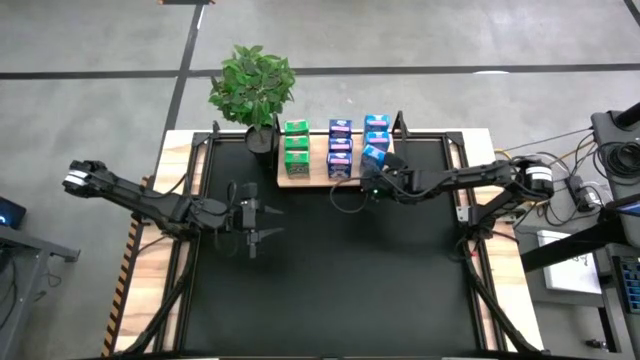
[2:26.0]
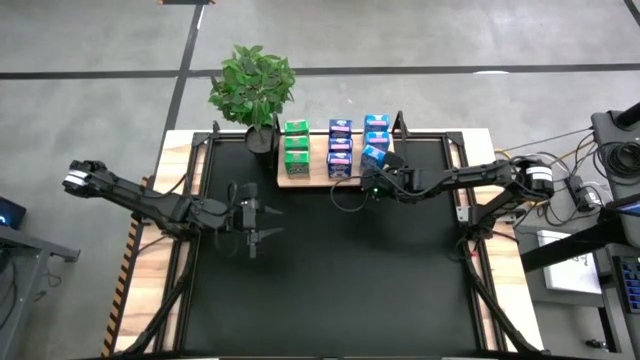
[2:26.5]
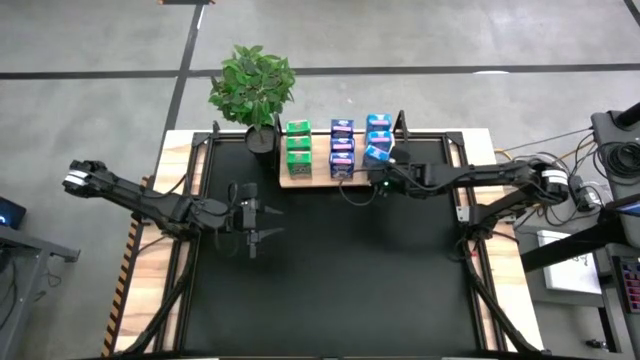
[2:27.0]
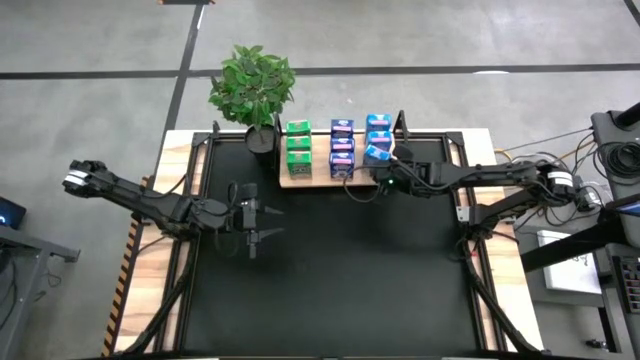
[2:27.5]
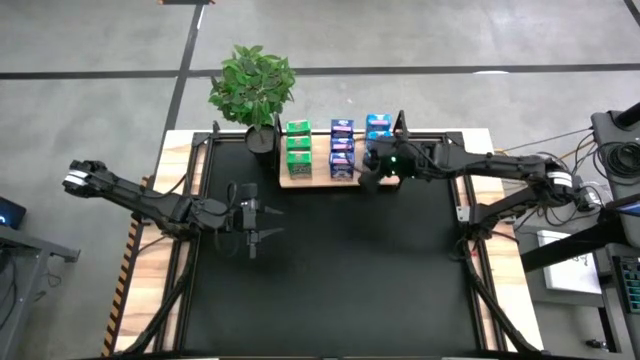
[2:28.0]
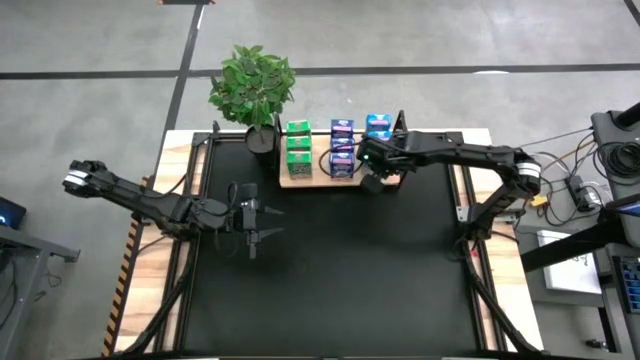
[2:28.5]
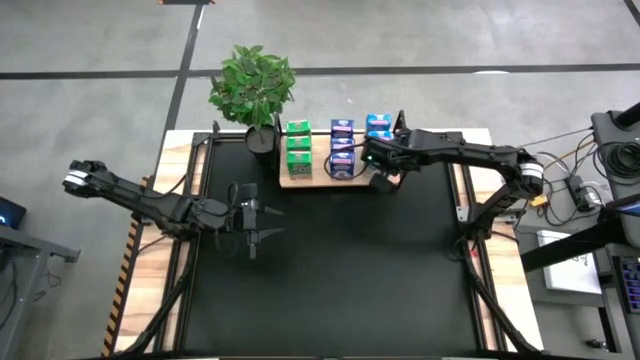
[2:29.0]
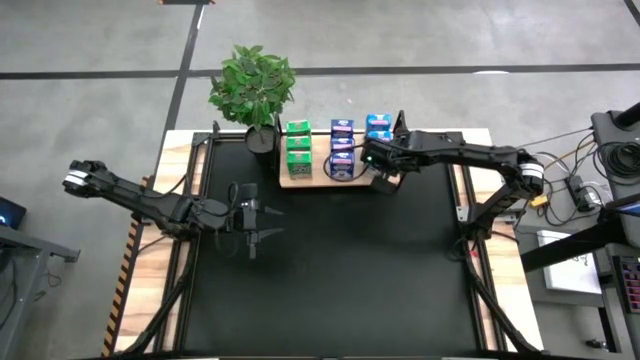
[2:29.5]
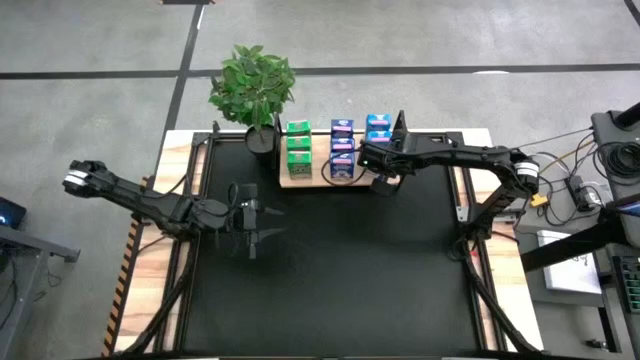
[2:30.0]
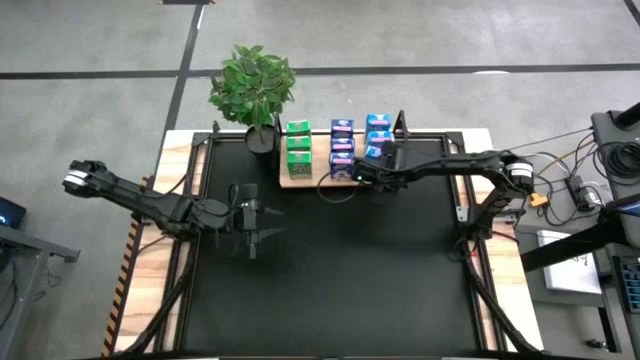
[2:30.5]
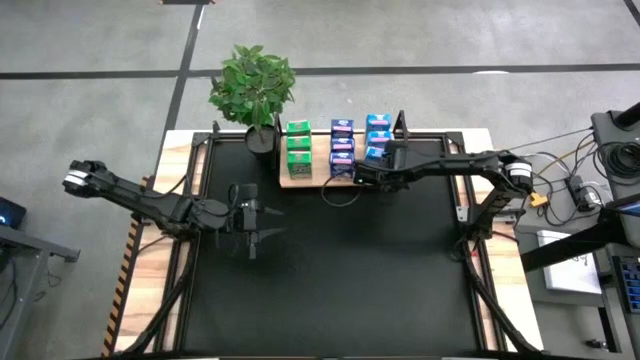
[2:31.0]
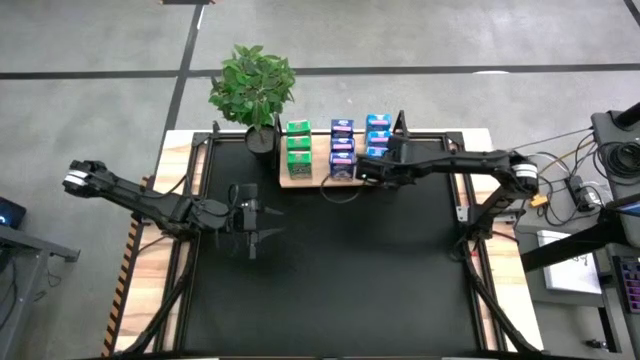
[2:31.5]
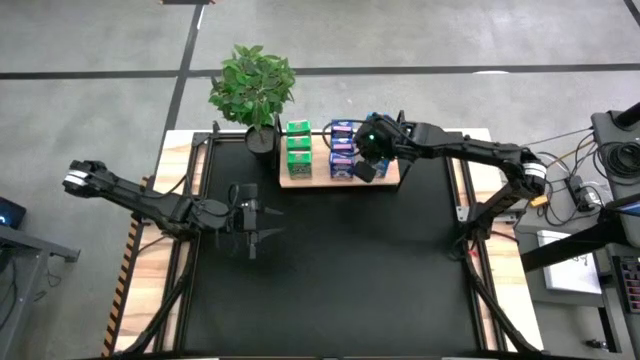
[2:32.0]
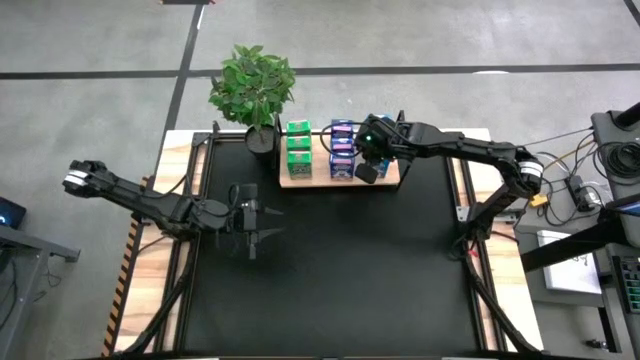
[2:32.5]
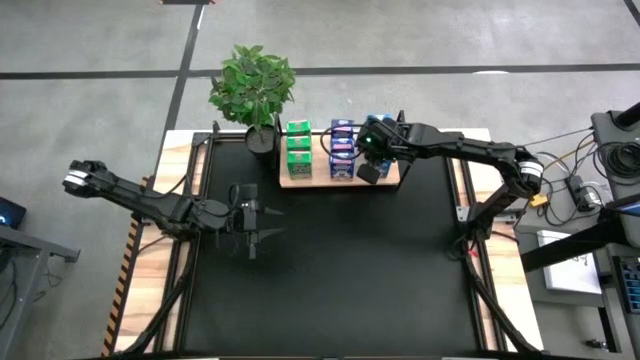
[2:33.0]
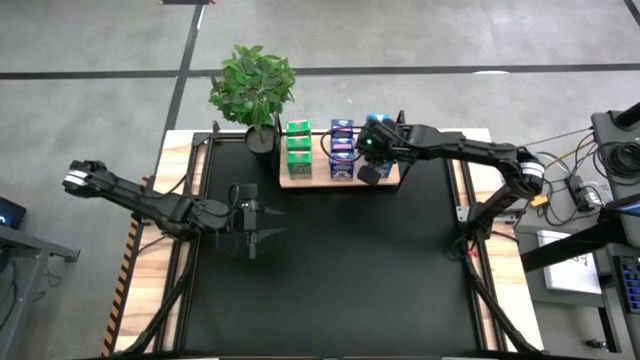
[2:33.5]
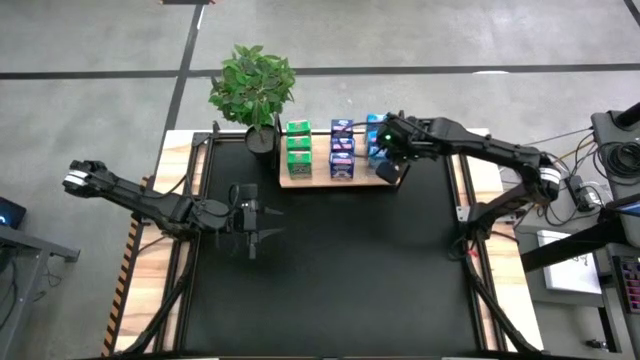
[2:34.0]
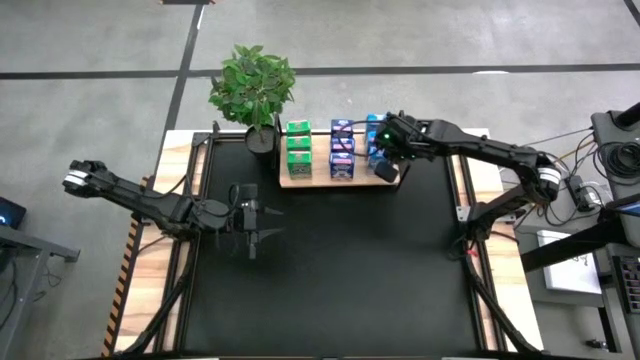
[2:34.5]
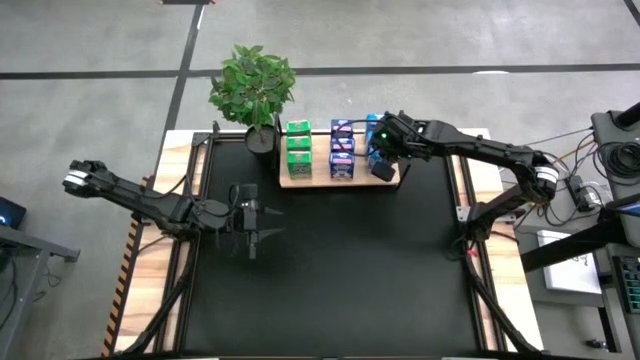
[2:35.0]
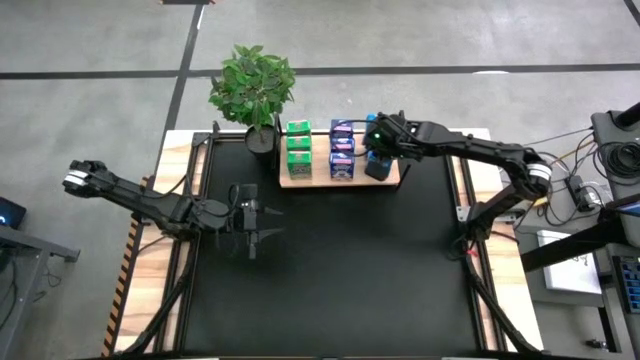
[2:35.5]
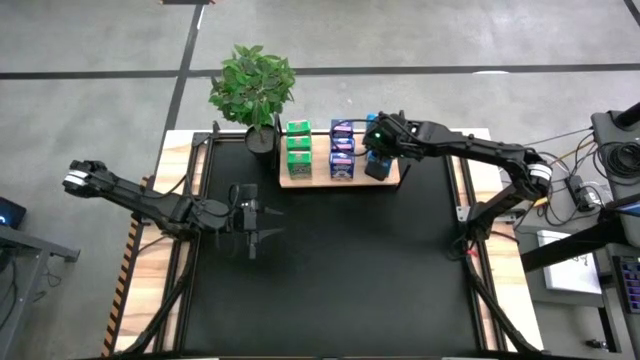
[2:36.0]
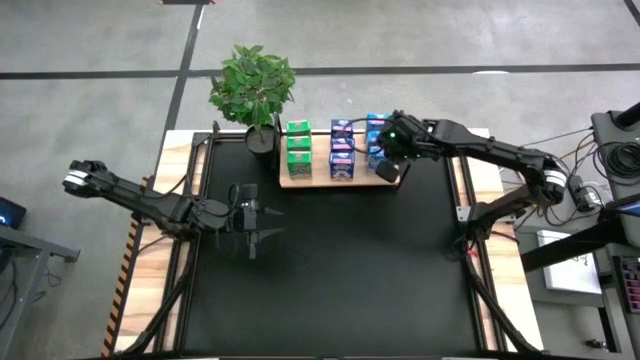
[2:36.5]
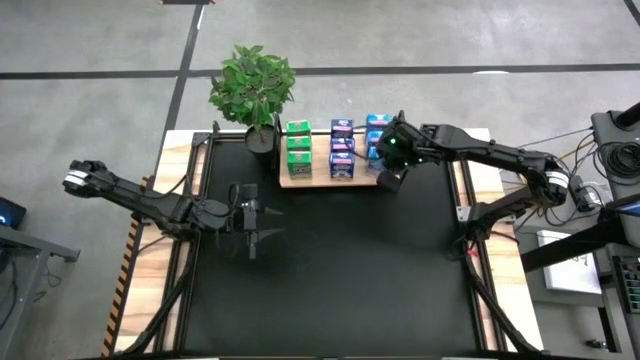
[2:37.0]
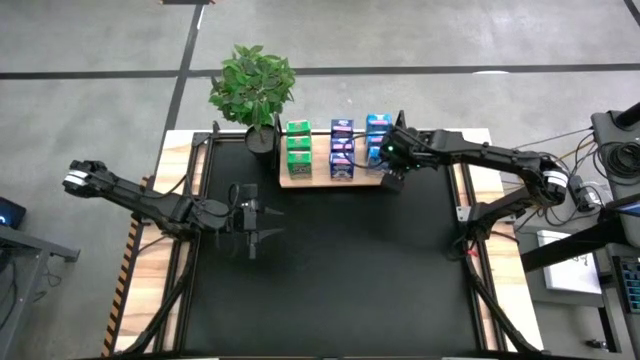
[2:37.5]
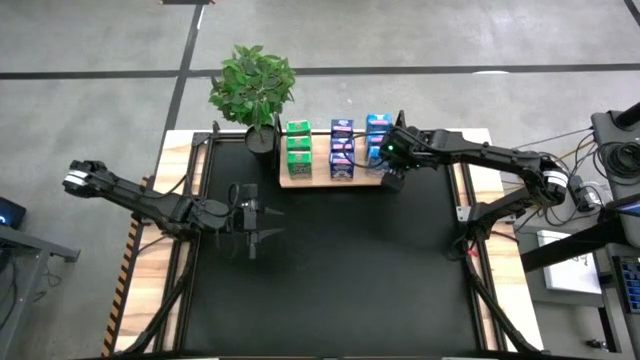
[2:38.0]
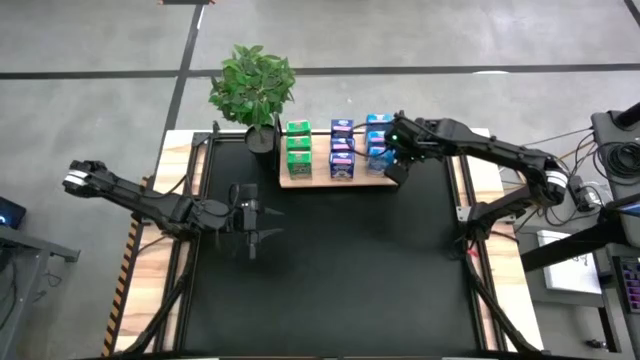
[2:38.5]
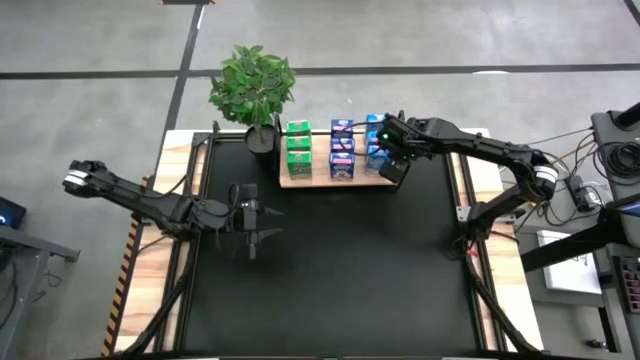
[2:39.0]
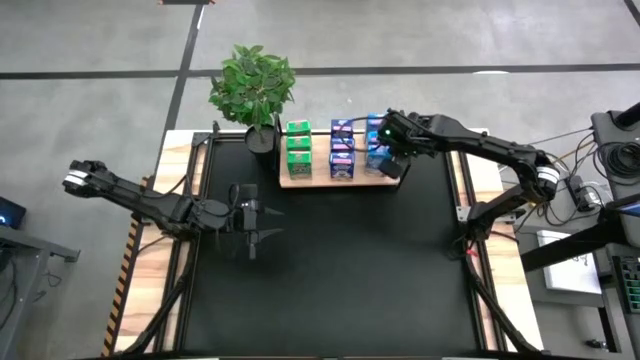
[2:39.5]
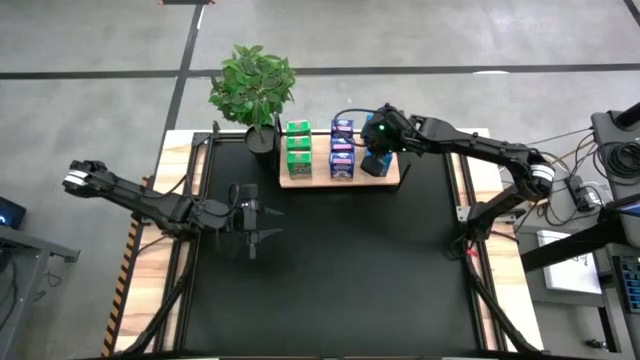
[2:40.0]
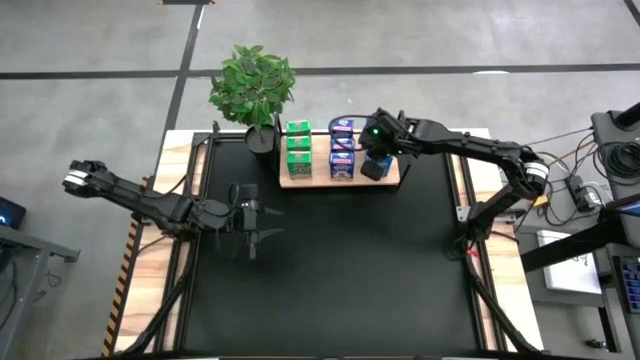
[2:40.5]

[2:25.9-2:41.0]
Task: Stack cereal on shelf
Put the light blue cereal box aligned with the light blue cereal boxes on the shelf

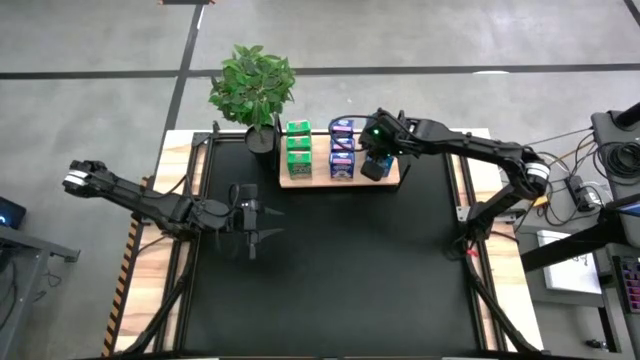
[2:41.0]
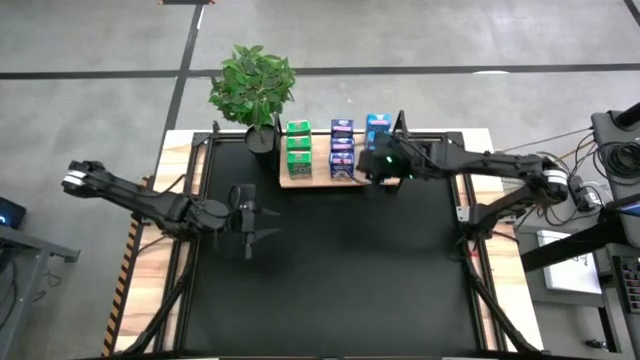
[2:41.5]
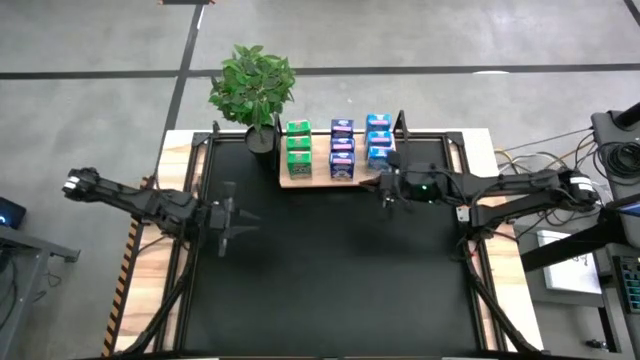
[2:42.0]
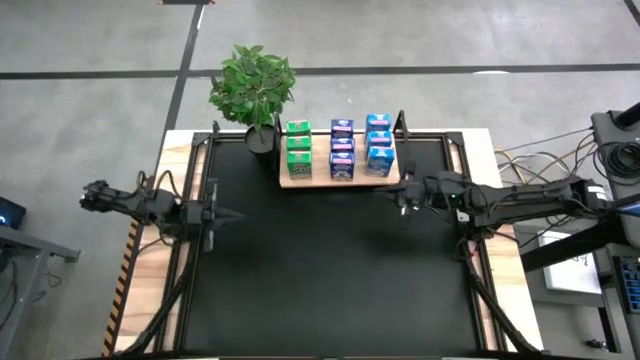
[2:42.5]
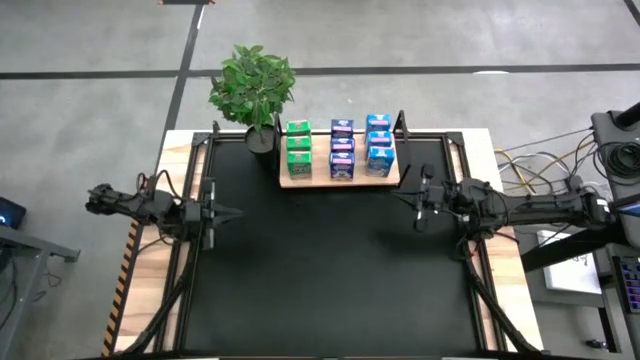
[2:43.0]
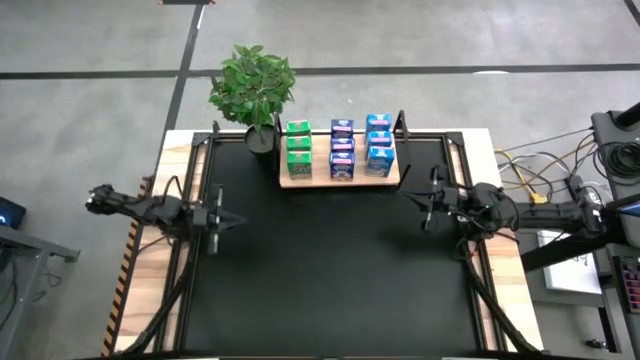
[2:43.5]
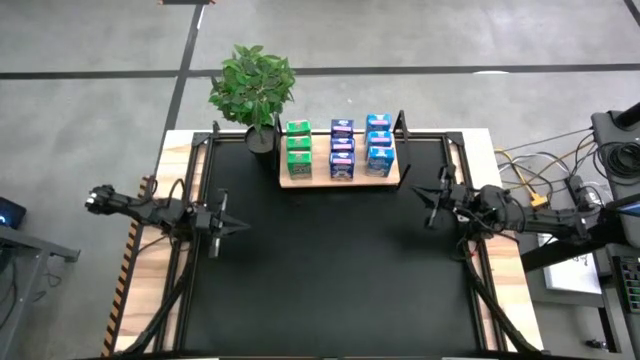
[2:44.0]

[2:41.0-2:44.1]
Return to Home Position

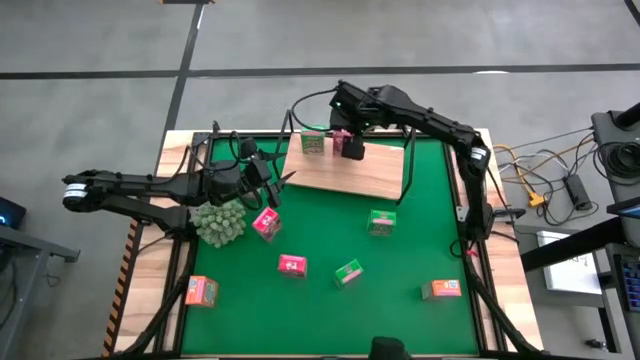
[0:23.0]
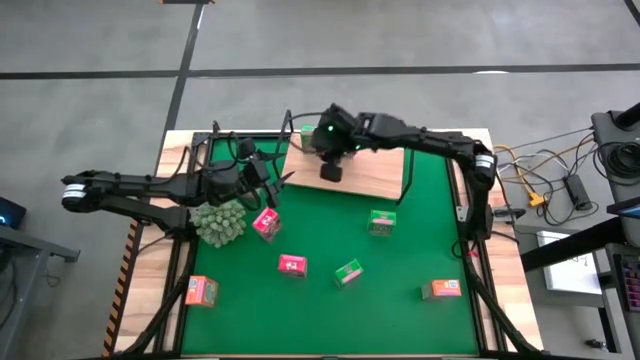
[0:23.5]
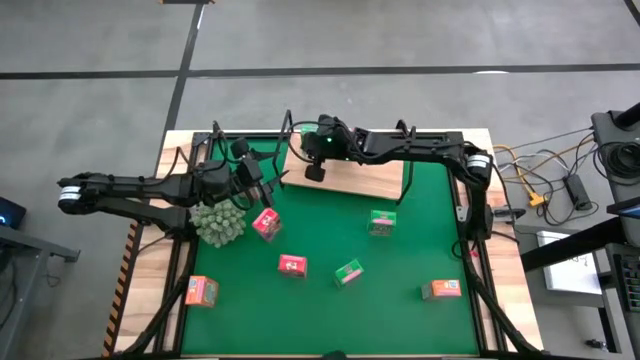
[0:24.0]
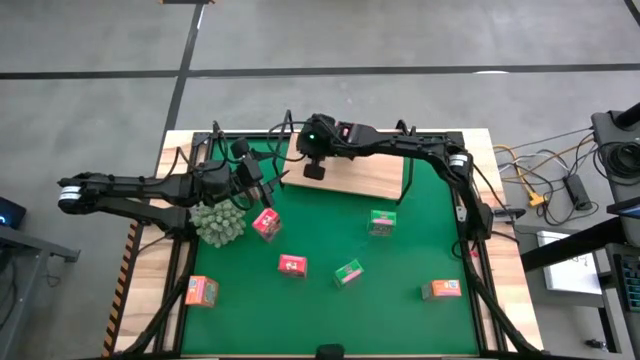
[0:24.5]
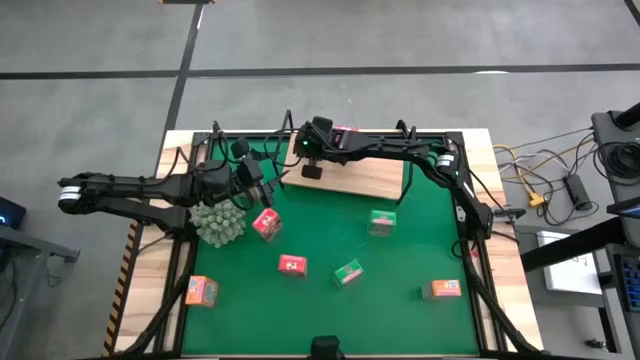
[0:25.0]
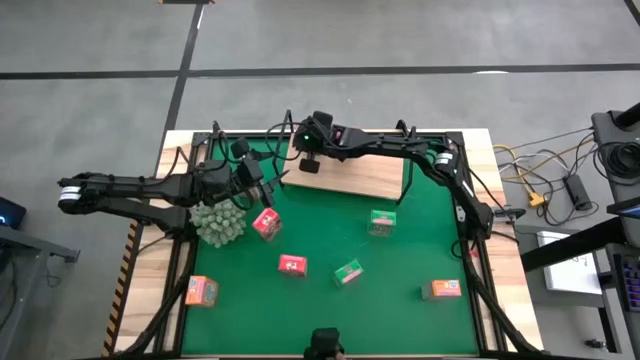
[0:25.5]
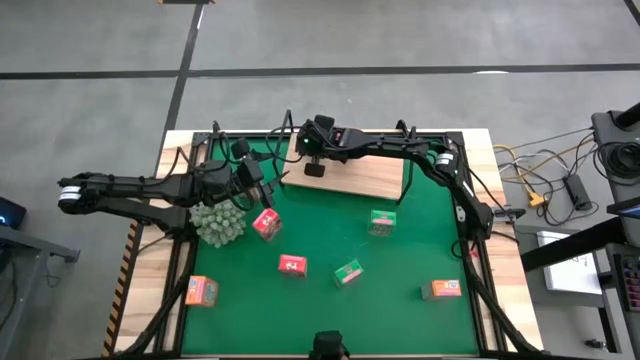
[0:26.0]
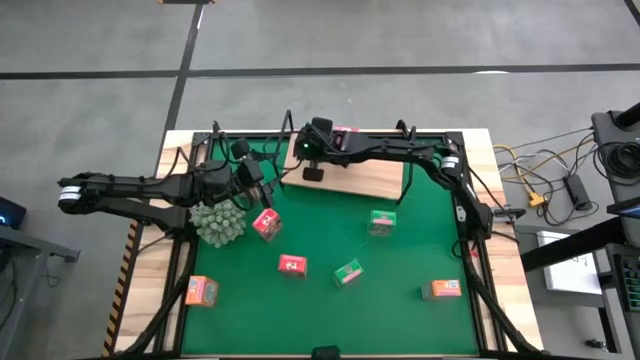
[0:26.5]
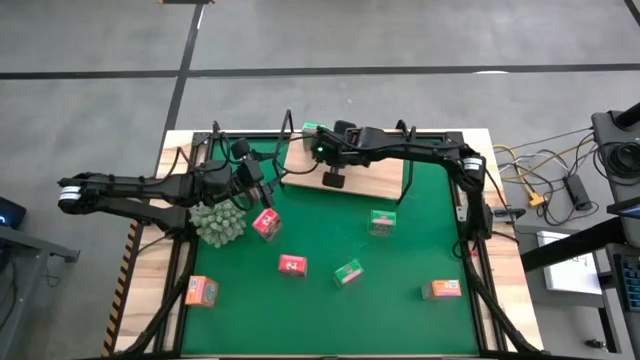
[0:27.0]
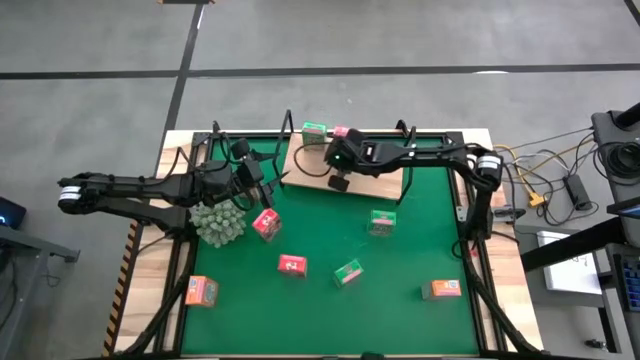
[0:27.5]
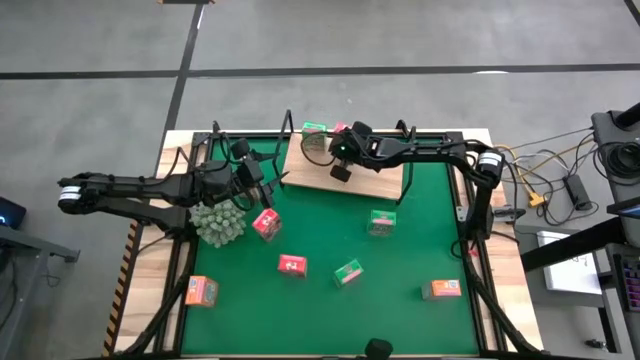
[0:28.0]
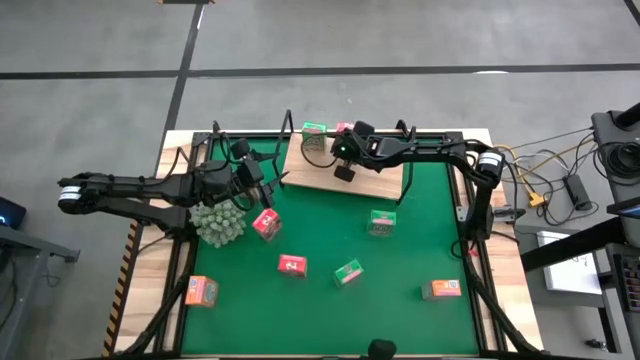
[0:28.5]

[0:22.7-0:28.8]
Task: Stack cereal on shelf
Adjust the cereal box on the shelf
